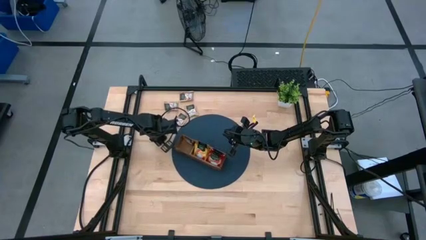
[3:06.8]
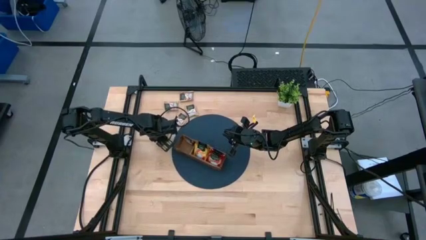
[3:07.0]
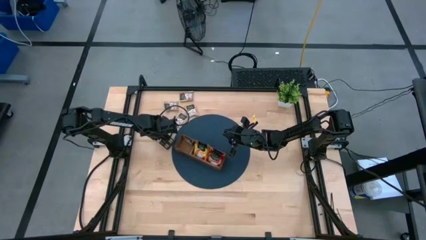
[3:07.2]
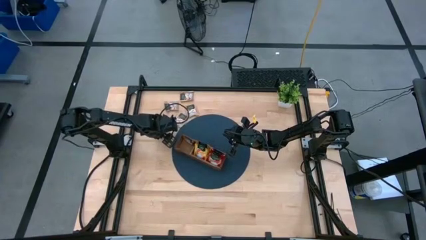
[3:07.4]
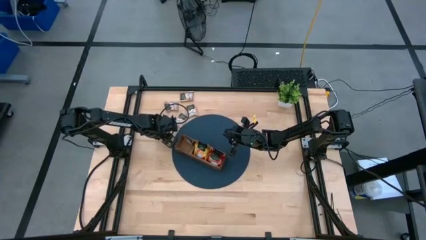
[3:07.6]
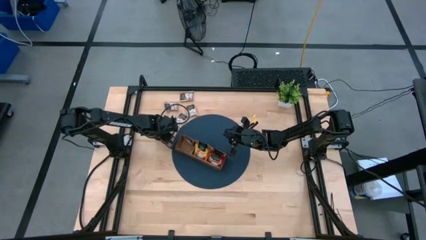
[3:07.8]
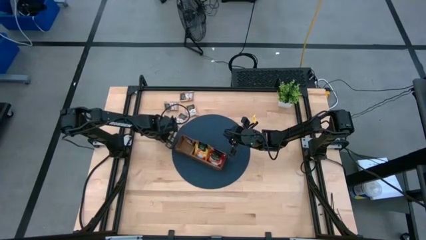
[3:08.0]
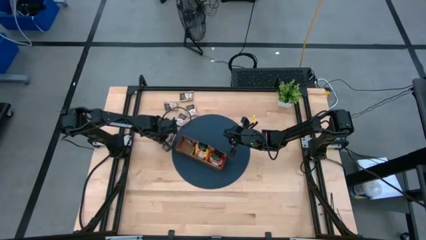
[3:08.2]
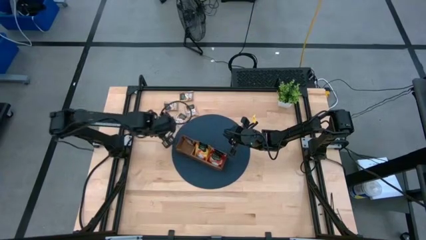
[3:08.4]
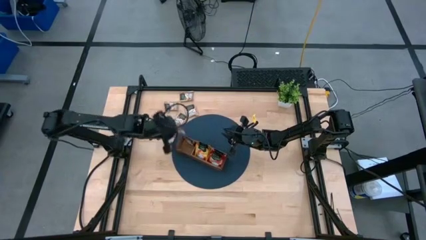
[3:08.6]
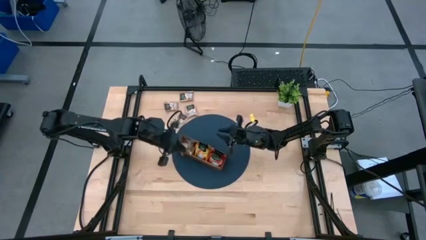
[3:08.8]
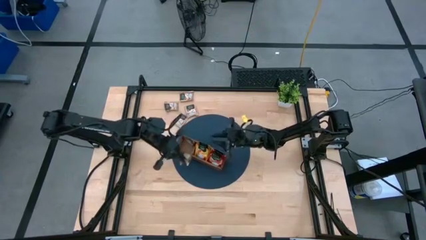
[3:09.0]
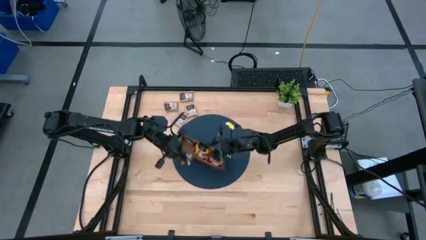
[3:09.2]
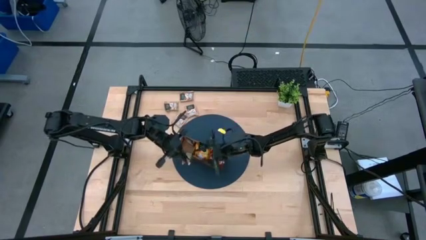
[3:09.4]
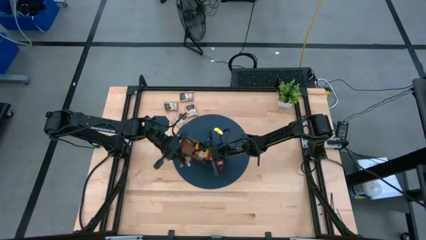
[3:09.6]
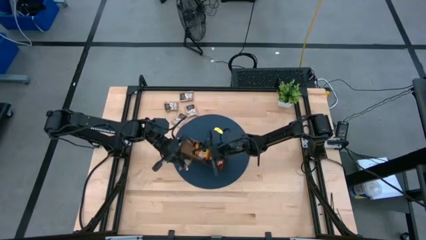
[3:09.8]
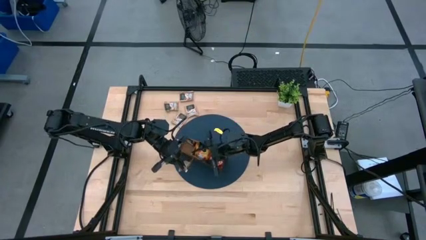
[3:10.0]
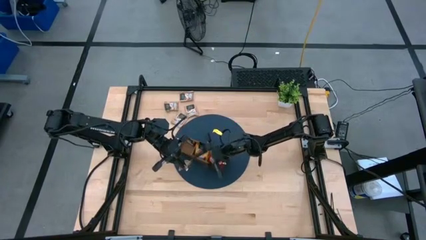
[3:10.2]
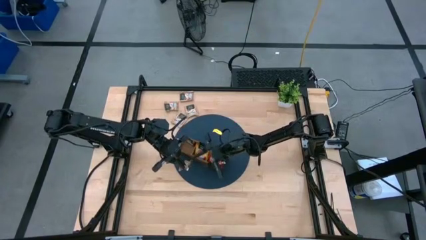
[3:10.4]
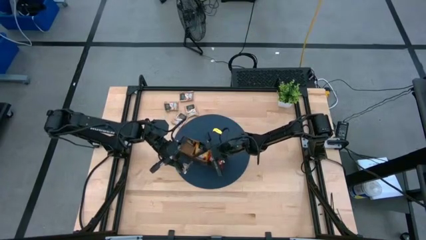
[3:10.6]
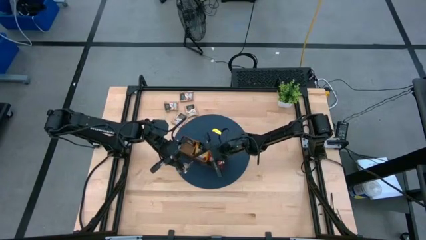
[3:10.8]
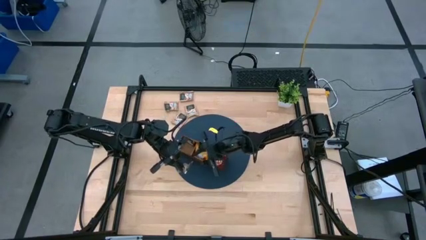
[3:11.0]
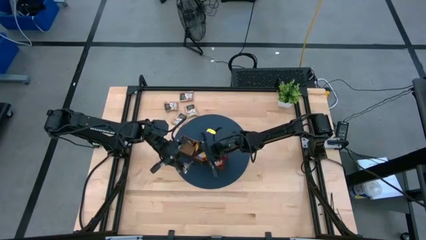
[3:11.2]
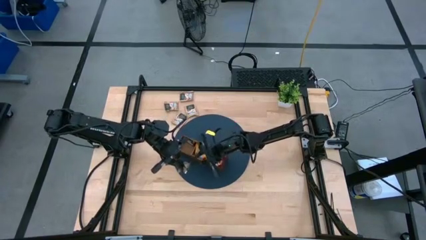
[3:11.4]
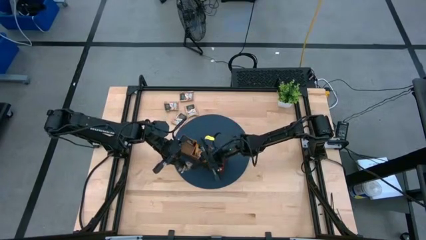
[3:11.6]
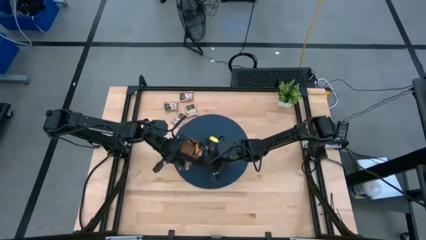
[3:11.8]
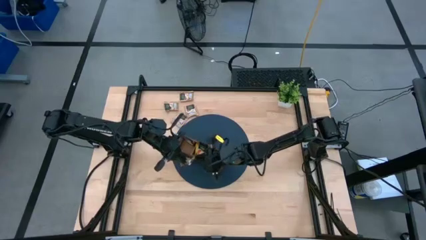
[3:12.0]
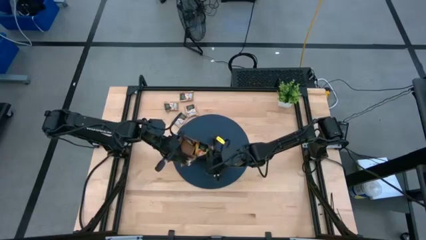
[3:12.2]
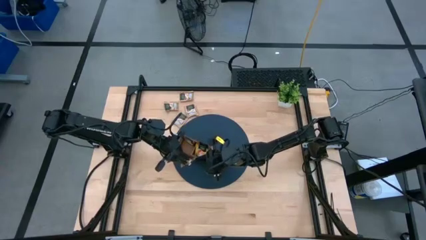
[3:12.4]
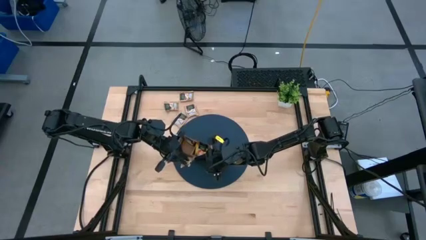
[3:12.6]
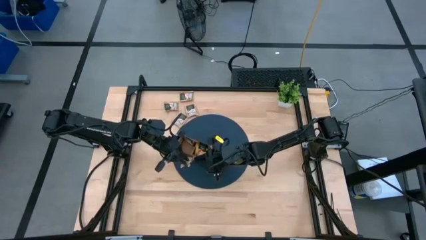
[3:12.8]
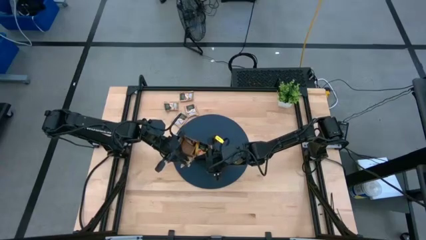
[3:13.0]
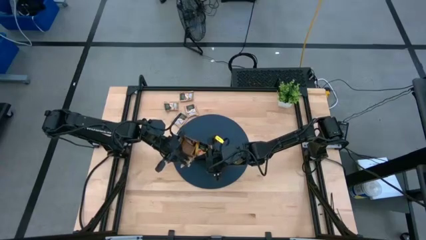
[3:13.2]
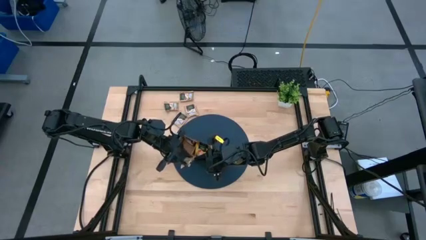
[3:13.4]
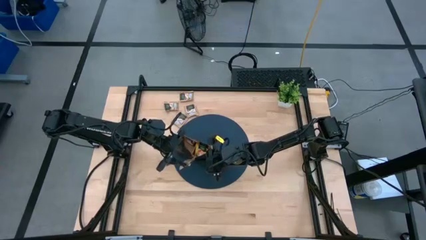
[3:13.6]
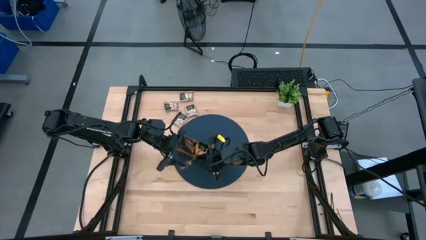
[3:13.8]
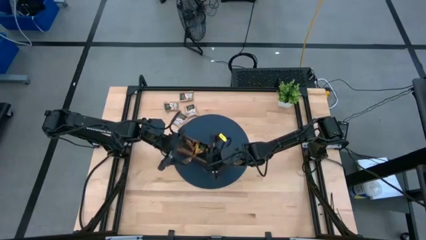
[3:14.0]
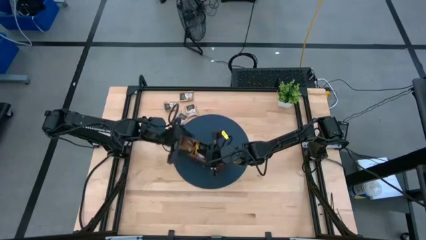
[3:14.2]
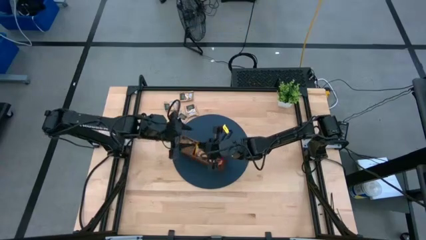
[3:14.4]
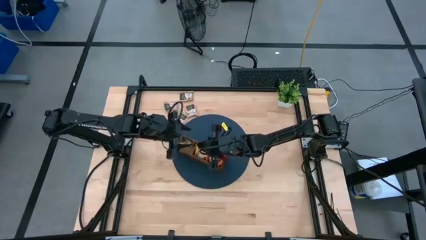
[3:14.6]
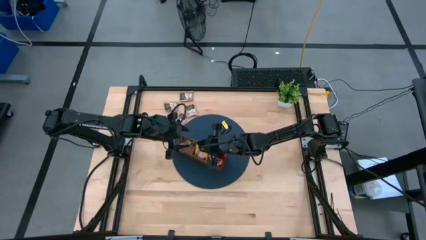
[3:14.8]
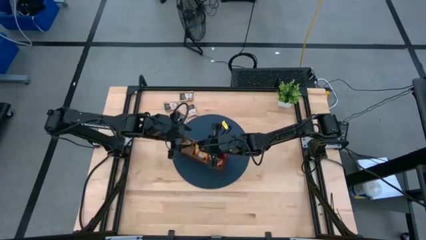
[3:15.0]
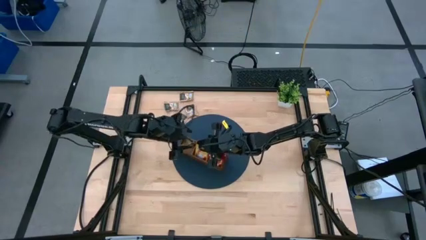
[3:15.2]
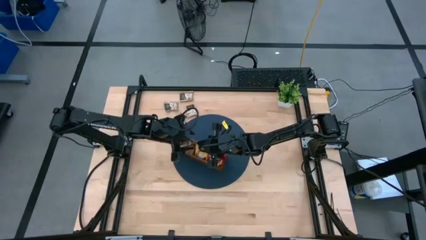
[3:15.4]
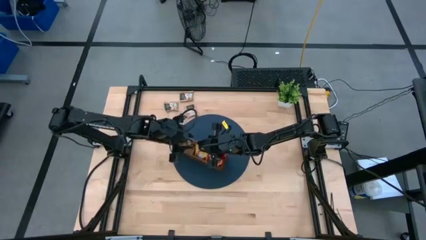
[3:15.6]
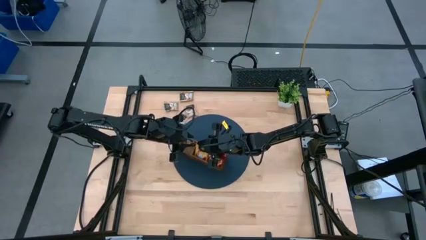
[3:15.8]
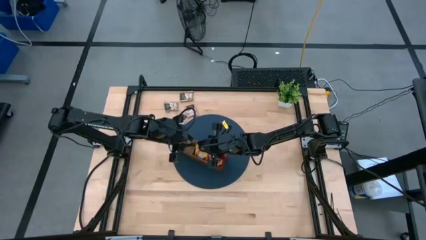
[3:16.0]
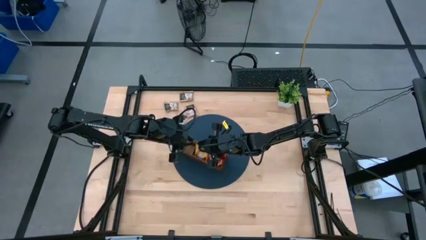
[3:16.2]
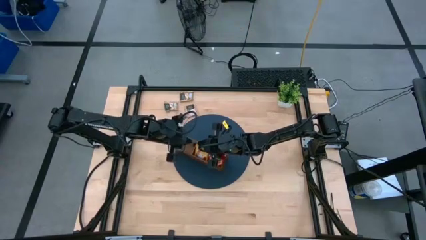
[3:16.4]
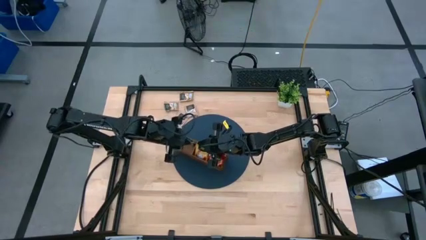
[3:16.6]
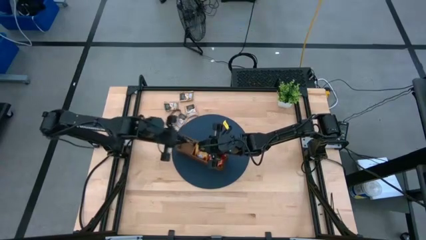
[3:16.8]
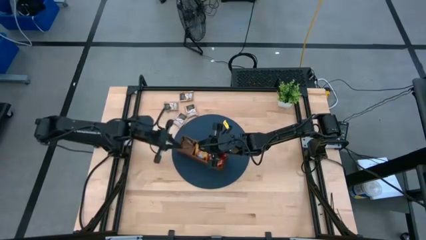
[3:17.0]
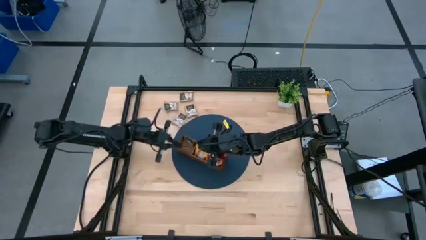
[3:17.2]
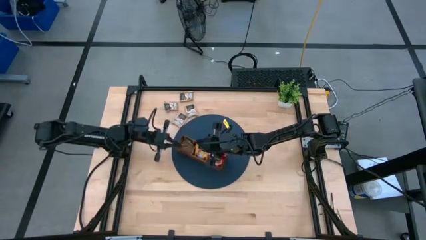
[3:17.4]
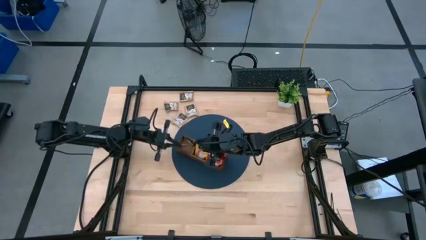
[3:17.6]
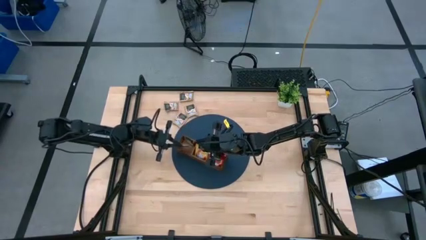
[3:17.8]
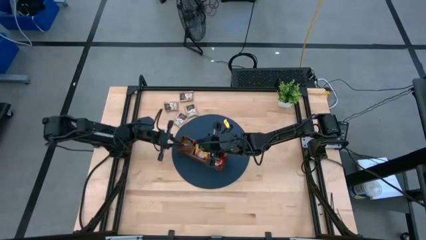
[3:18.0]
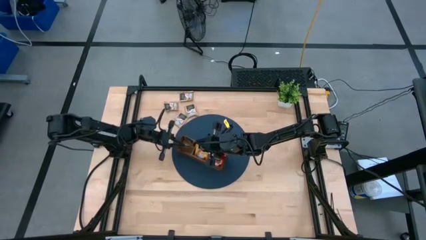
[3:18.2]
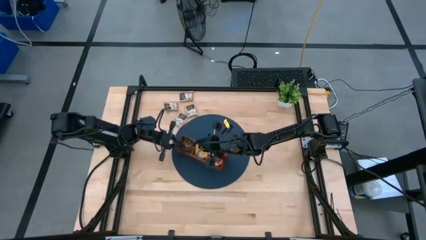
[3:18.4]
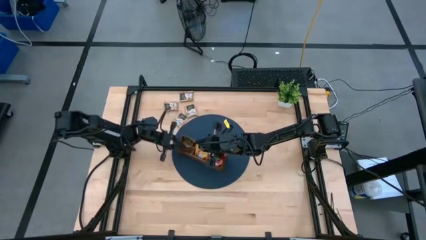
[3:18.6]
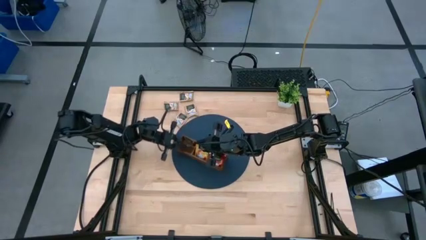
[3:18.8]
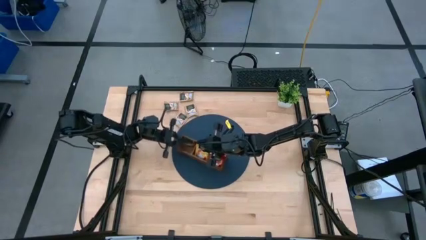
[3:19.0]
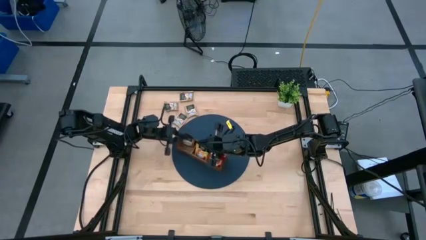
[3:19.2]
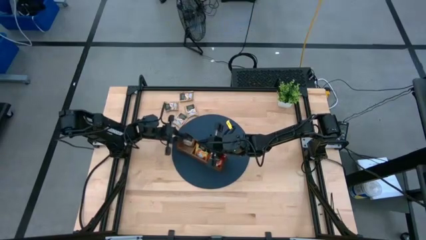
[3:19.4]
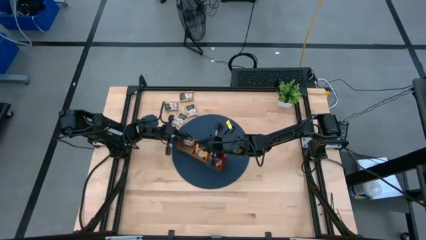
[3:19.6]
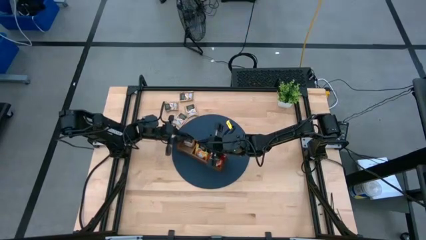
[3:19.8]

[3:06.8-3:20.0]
Task: Pick & Place Tea
Put the brown tea bag into the left section of the wooden organizer

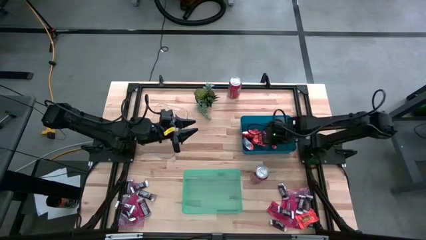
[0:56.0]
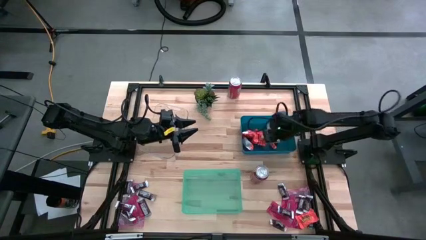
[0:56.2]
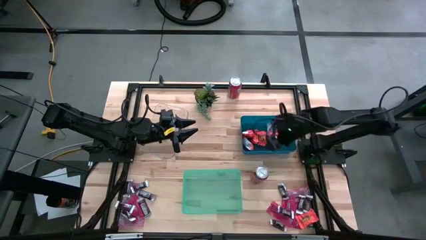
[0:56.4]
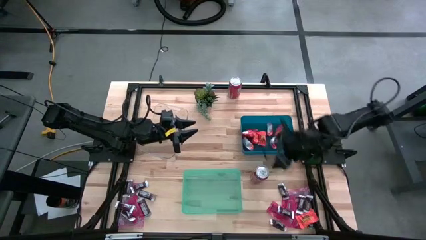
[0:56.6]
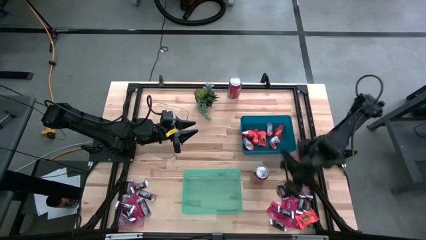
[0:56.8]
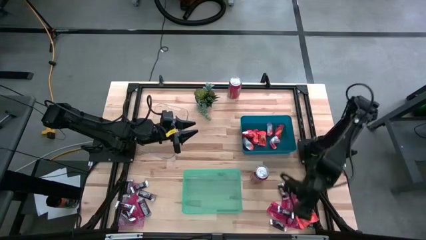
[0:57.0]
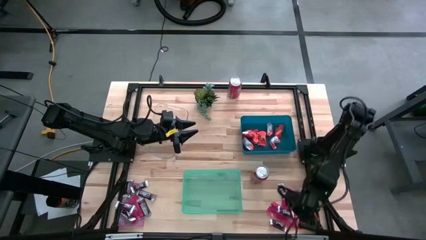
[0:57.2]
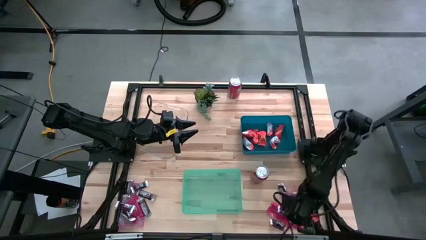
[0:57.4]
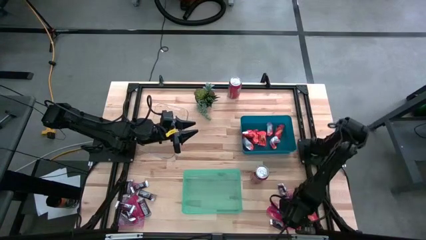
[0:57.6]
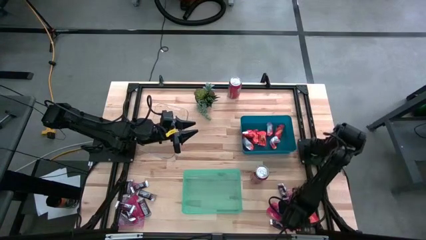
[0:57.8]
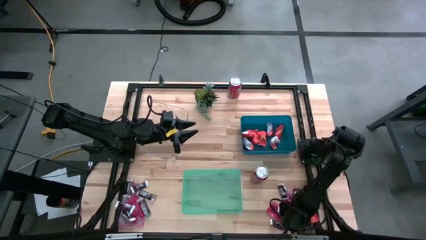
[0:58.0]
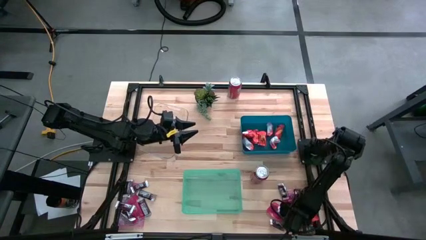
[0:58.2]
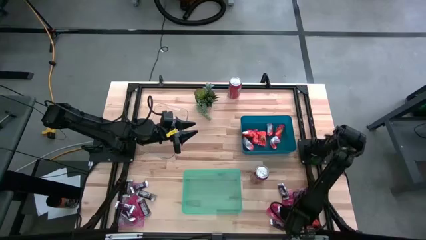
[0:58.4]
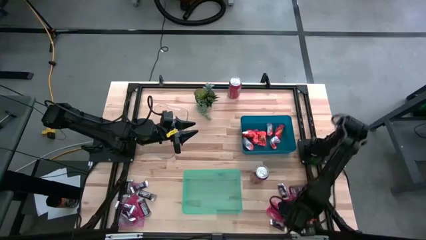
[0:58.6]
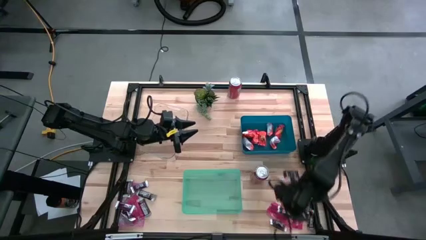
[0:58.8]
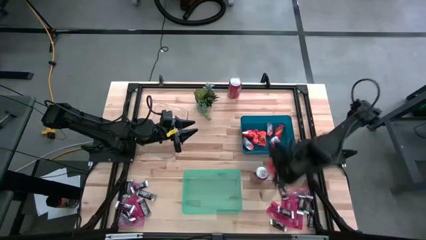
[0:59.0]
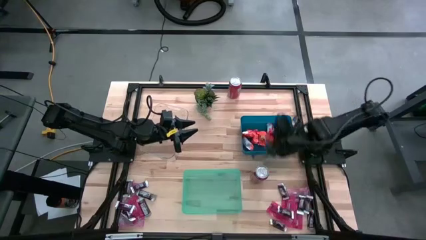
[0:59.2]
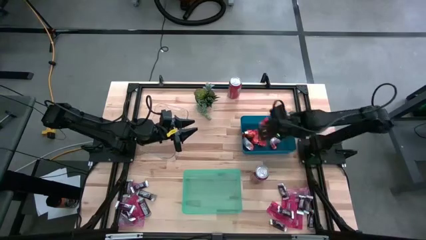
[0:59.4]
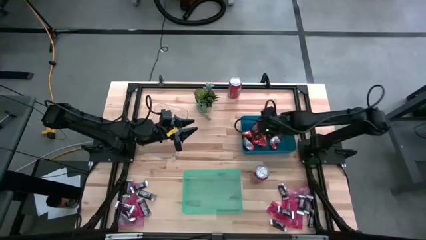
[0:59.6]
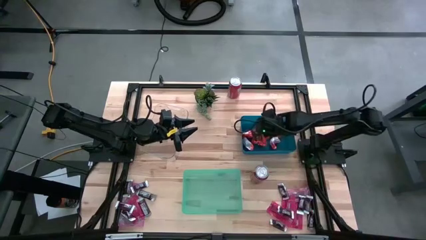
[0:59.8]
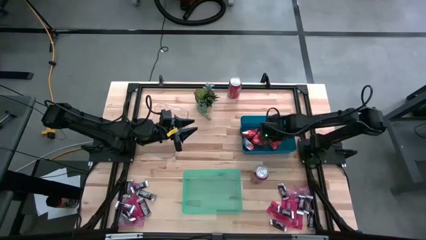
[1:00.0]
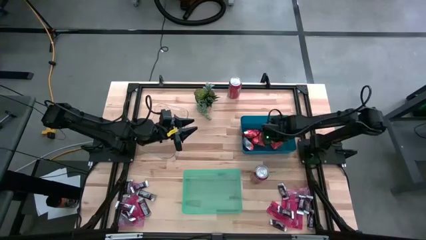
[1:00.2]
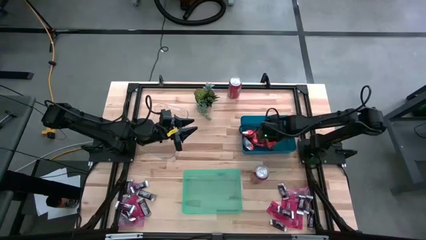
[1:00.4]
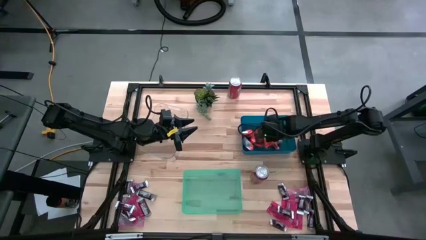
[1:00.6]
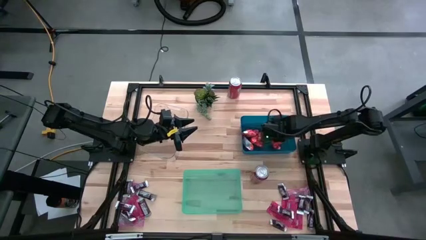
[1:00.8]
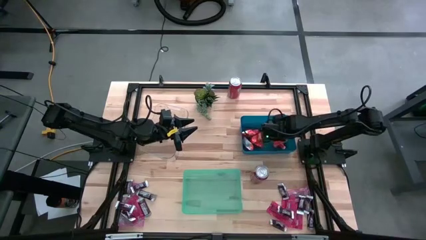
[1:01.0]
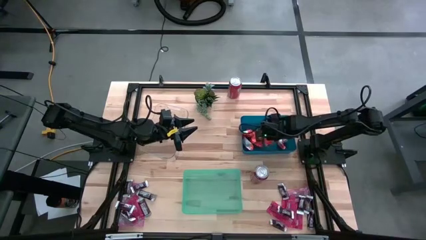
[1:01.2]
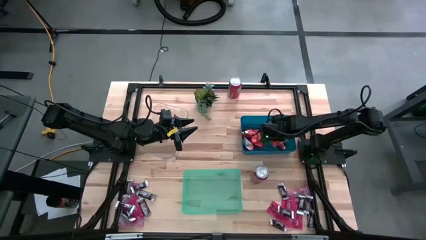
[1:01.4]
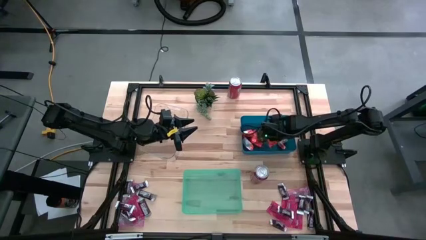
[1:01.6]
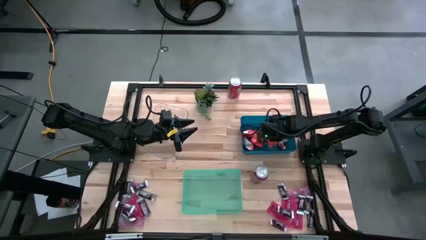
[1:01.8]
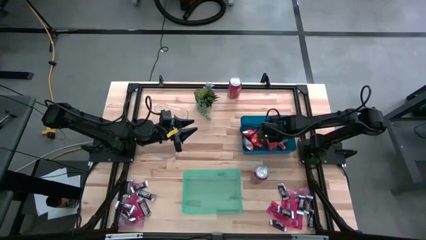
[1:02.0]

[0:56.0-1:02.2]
Task: Sort candy
Put the orange chocolate into the blue bin
